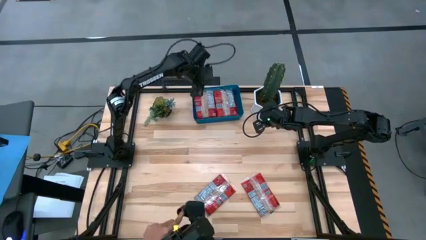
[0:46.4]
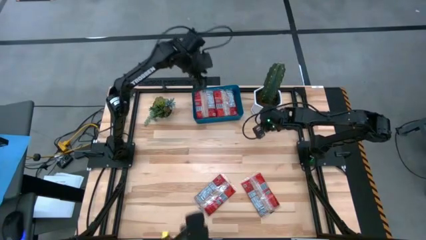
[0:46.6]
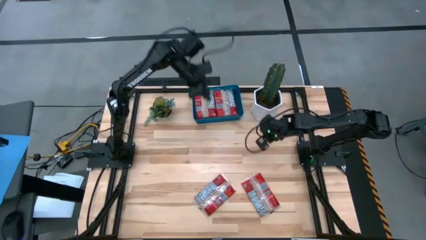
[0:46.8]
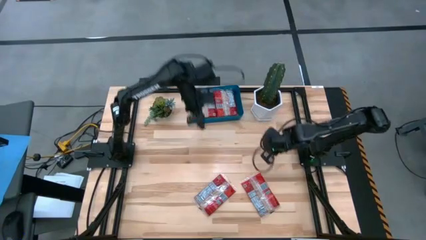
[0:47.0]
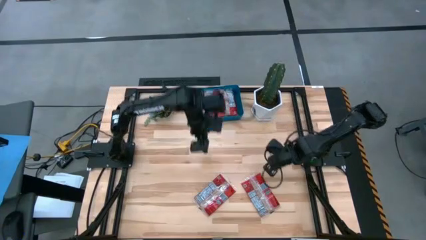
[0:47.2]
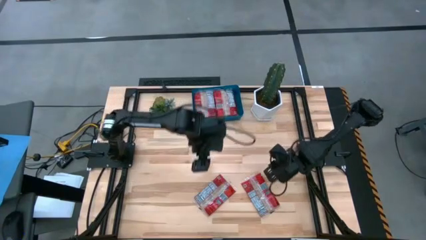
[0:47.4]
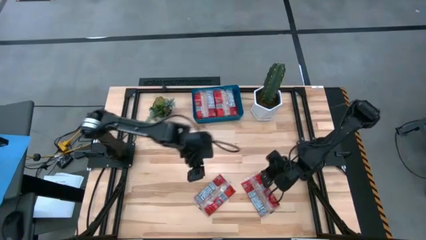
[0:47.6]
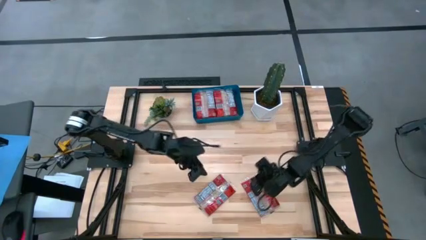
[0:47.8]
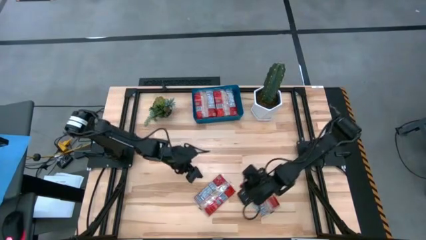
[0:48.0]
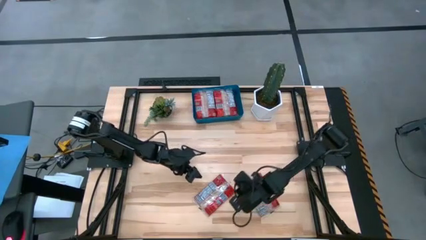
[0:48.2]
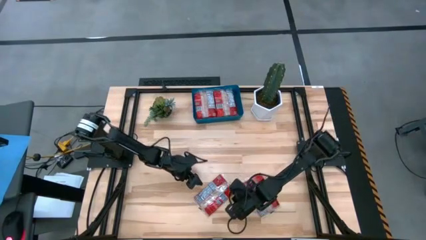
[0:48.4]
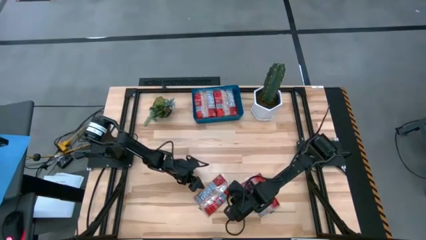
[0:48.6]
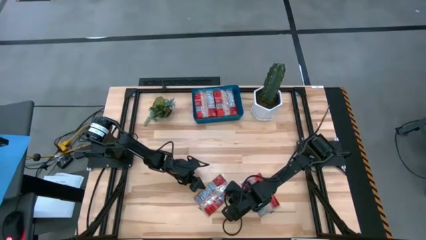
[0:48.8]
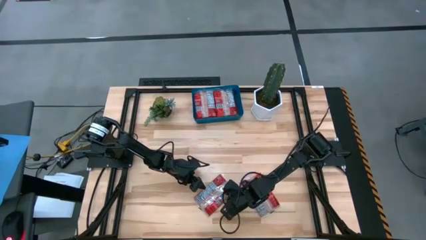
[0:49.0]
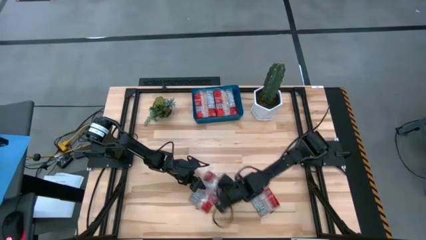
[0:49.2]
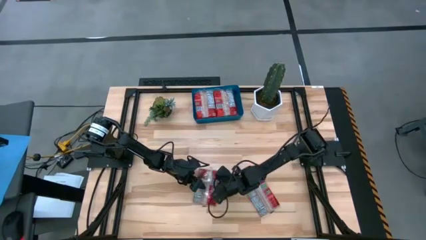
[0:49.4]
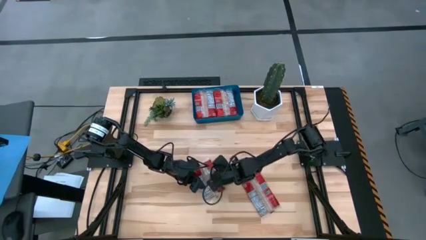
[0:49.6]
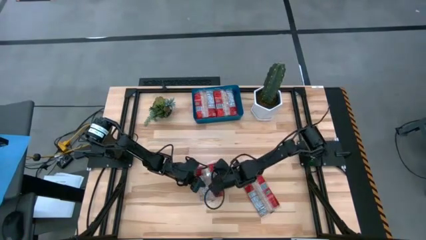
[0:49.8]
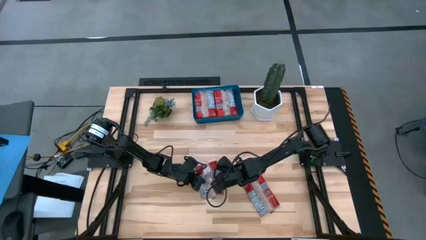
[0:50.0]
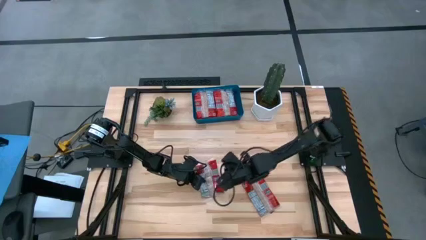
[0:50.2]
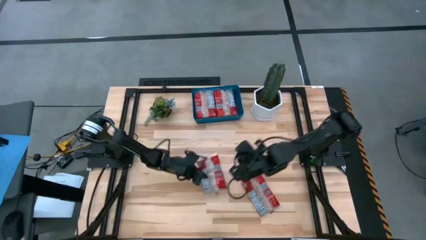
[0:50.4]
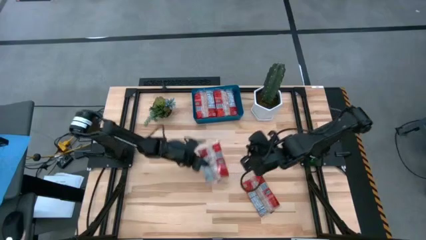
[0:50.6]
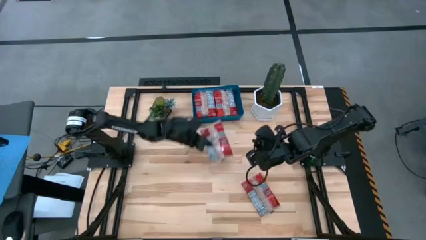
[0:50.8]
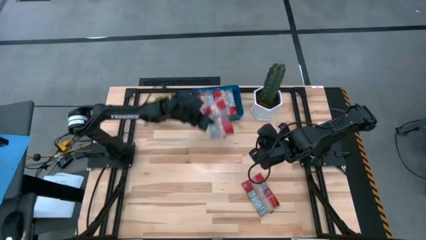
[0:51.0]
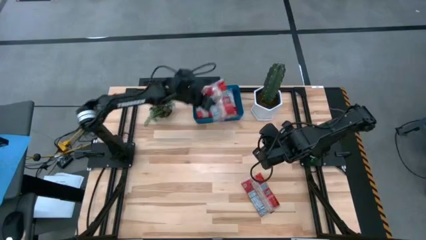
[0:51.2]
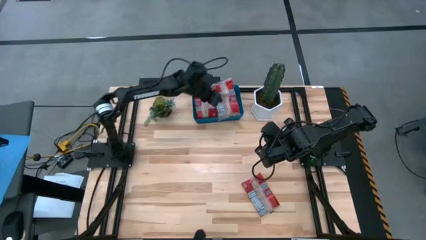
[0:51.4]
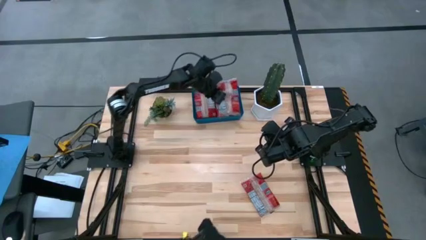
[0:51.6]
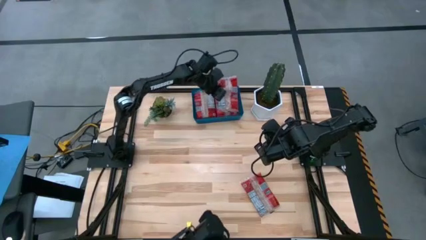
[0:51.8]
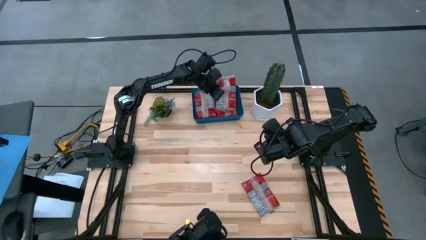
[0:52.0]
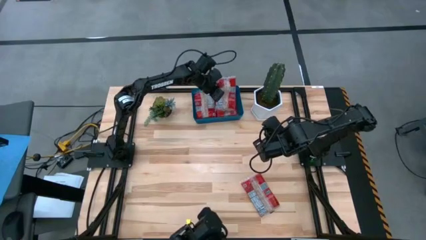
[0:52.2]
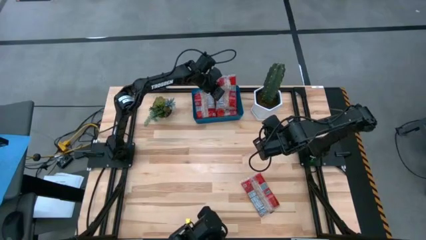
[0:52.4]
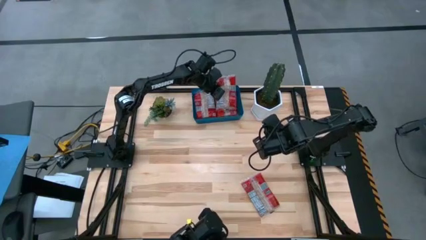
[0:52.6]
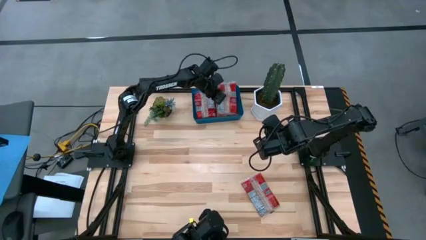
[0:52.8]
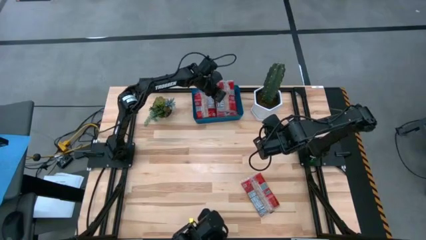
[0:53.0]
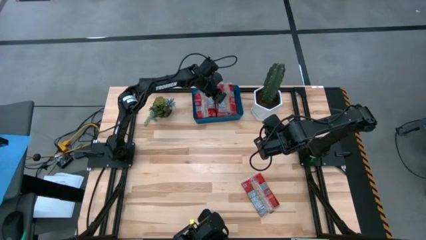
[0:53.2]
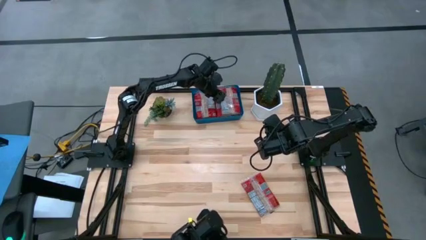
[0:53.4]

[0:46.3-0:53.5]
Task: Sort popcorn bags into baskets
Put the left popcorn bag into the blue bin

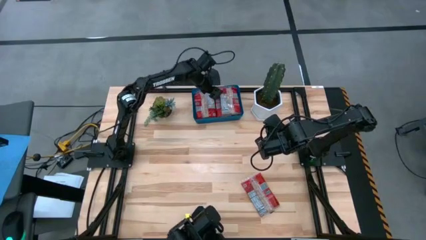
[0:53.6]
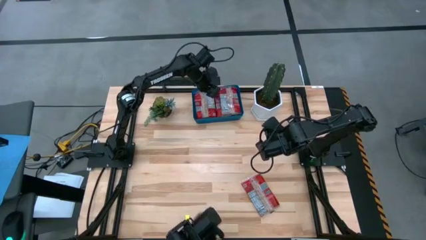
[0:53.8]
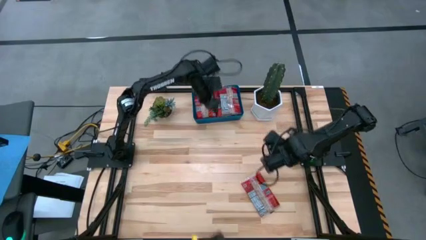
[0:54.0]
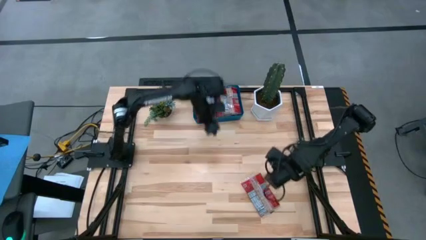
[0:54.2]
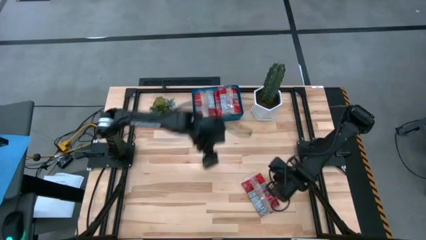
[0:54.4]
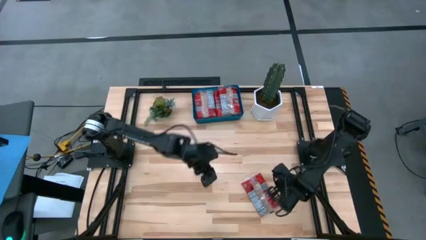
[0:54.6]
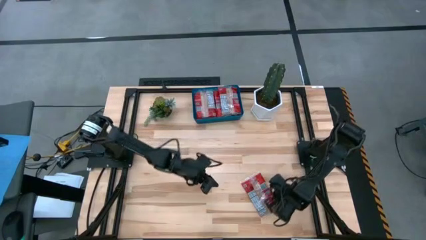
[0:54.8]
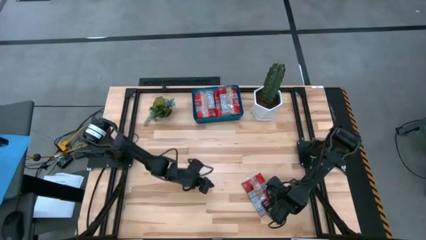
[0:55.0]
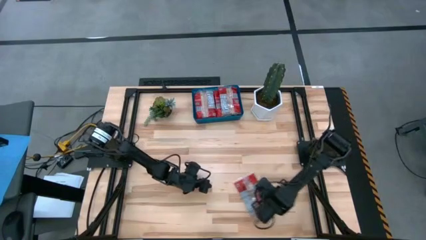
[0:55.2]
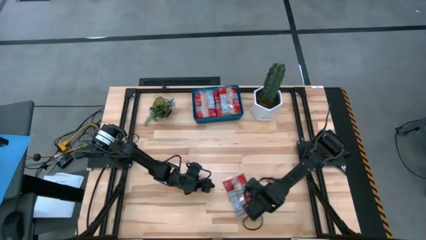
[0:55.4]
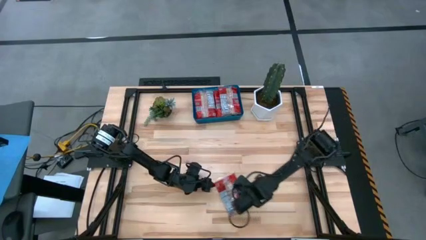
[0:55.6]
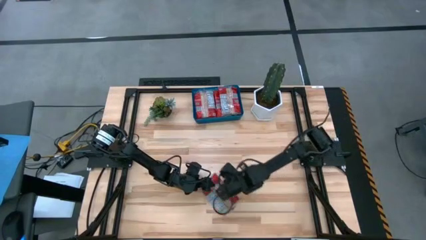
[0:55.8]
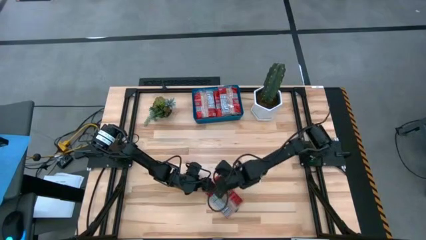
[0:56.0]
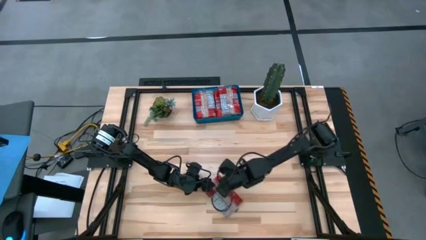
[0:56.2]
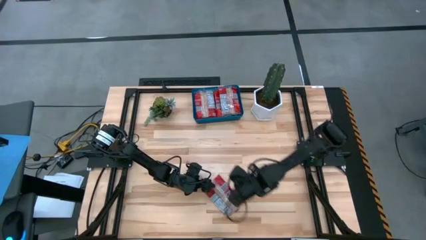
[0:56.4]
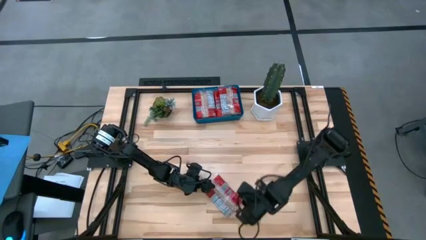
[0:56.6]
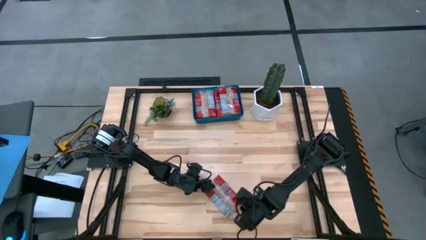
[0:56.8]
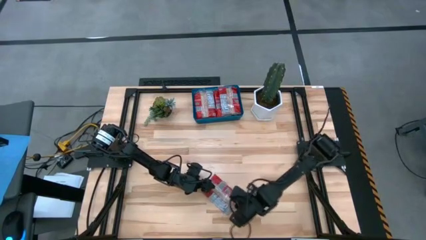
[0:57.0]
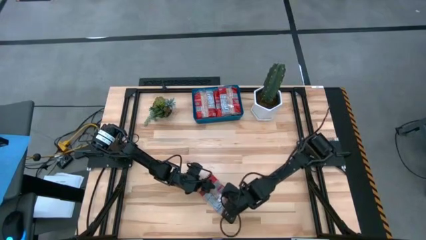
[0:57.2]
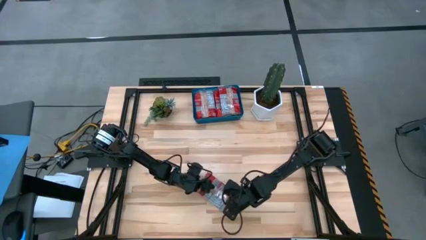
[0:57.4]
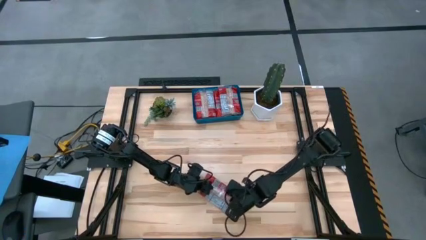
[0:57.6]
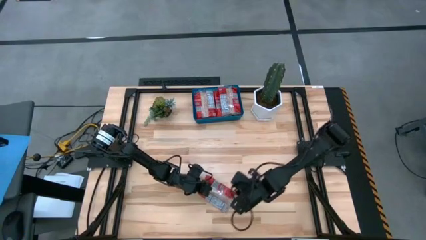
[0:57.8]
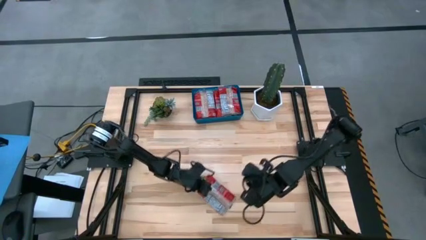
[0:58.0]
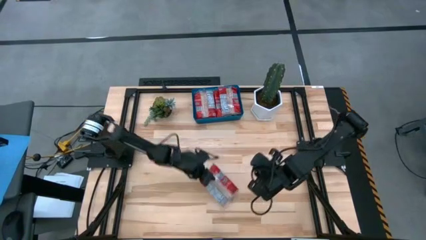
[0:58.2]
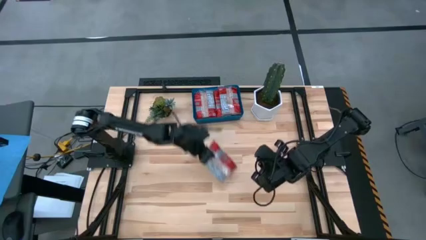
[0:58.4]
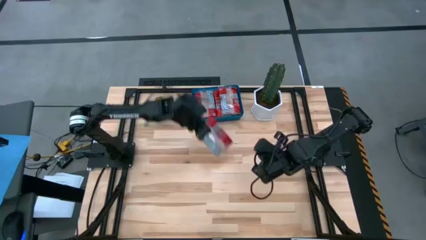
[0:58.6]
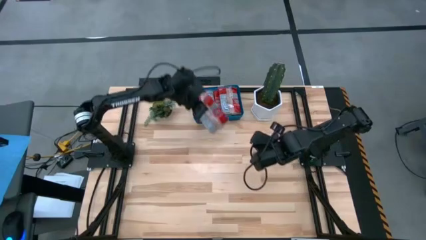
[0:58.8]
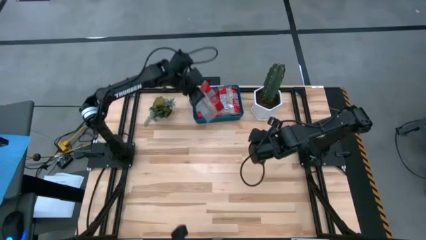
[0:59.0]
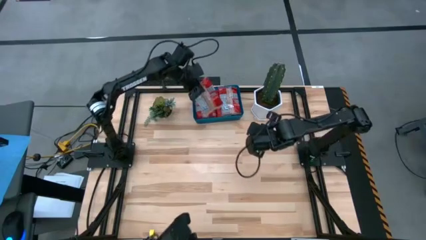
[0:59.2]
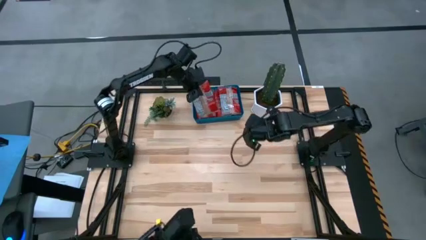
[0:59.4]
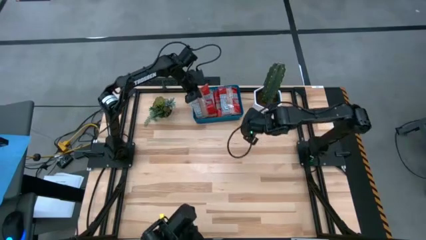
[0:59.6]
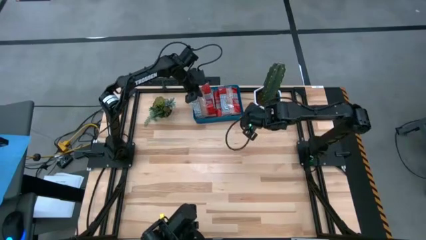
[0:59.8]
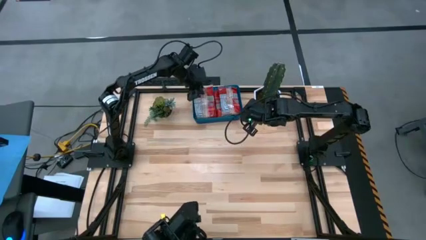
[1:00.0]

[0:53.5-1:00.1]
Put the popcorn bag into the blue bin

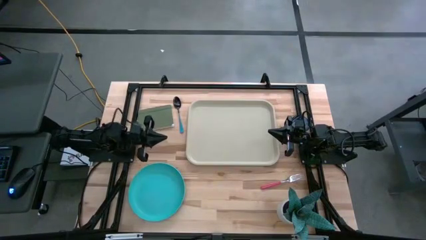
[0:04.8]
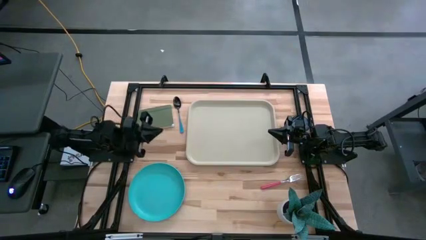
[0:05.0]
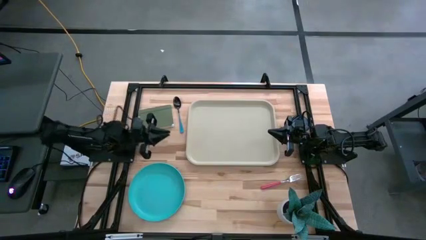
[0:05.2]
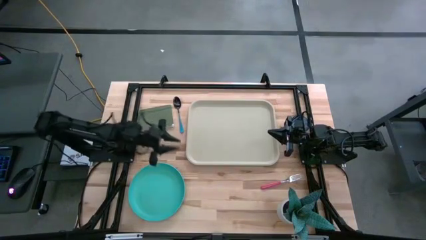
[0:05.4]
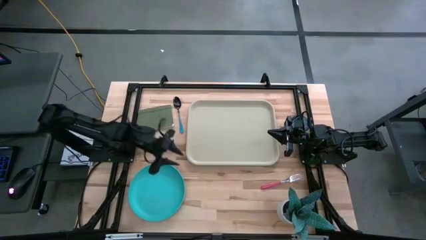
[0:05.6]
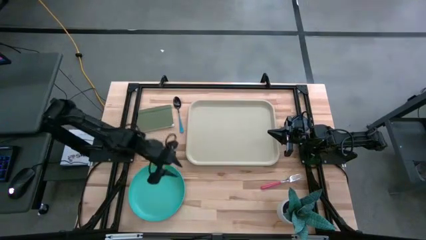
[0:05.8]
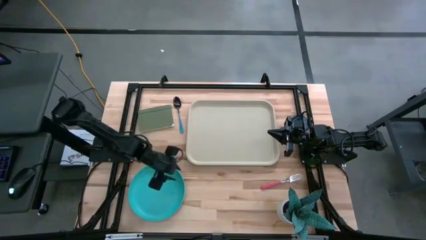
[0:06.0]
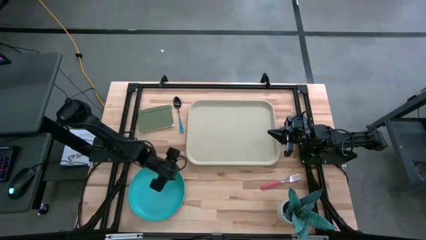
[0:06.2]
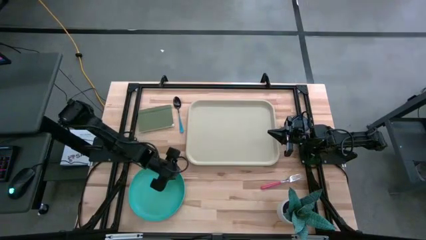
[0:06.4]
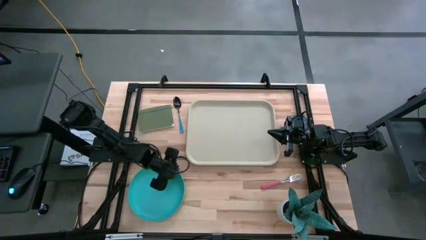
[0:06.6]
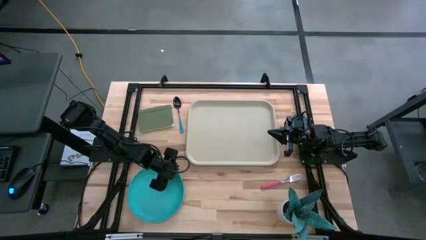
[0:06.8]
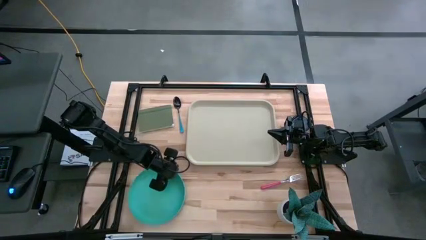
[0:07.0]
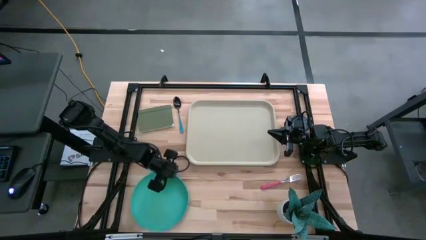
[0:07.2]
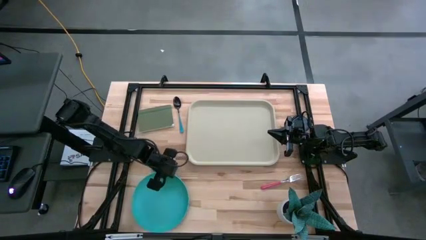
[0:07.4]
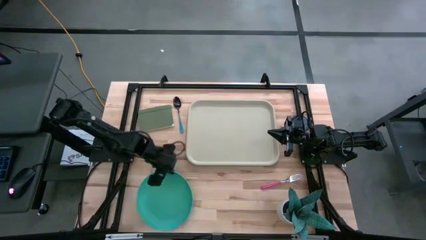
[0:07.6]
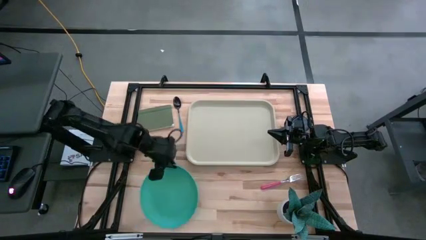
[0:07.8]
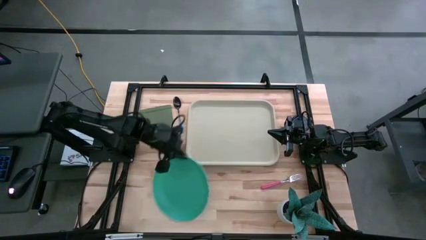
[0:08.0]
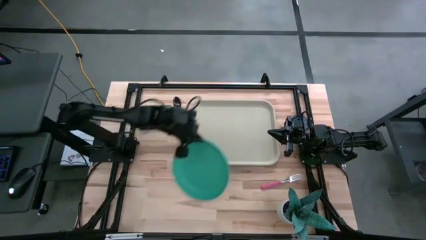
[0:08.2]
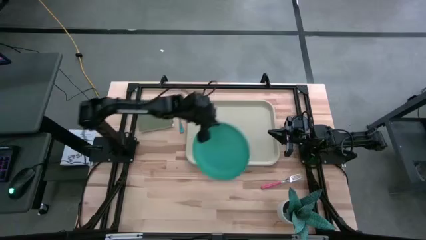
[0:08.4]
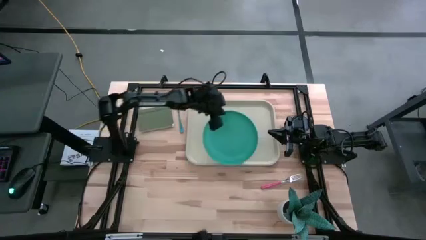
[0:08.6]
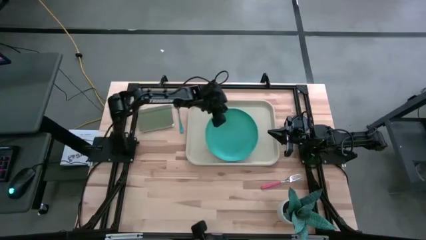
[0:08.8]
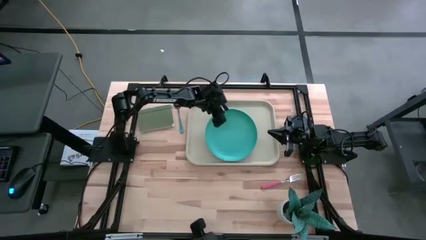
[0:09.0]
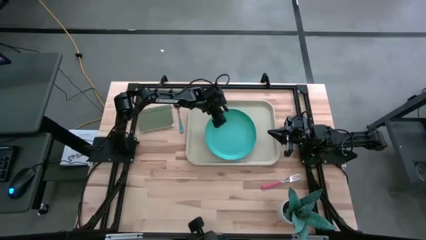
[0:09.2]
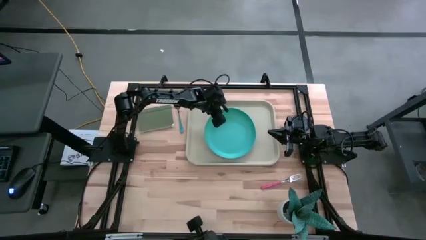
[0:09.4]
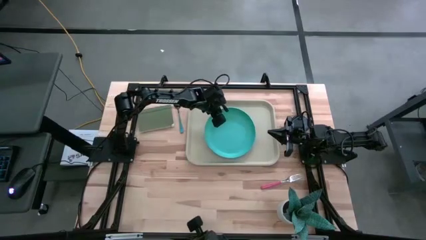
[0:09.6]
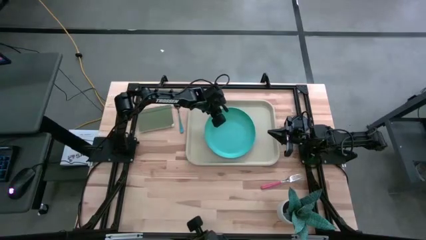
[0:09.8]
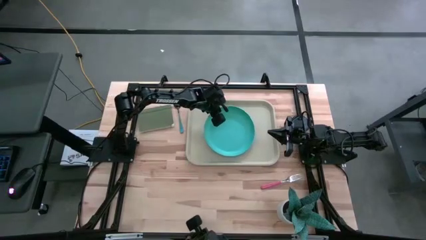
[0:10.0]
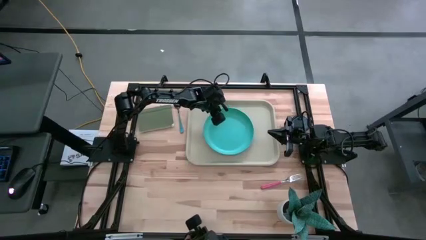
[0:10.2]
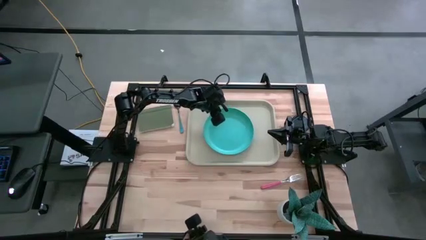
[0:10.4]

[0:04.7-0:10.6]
Task: Pick and place plate/cup/fork/spoon on tray
Put the blue plate on the gray tray
